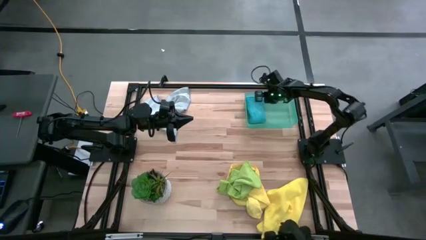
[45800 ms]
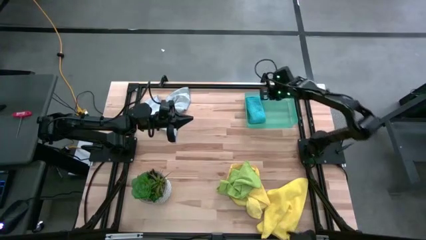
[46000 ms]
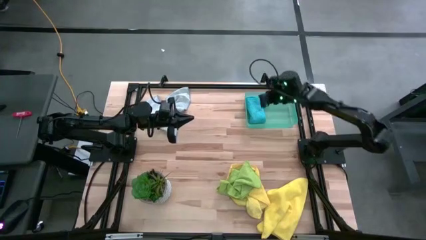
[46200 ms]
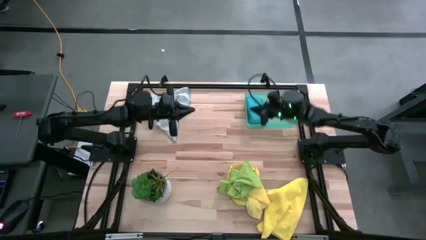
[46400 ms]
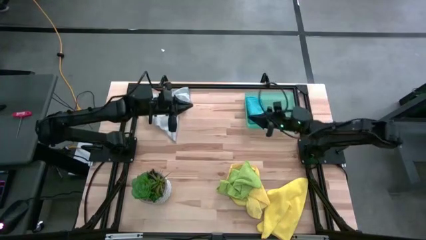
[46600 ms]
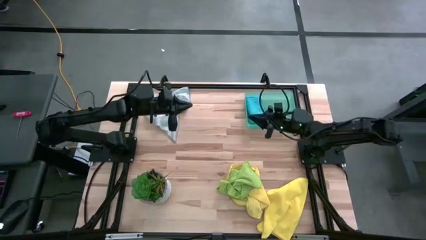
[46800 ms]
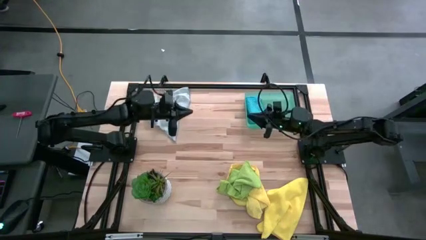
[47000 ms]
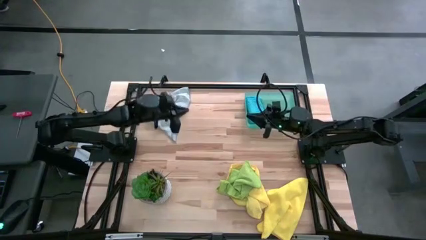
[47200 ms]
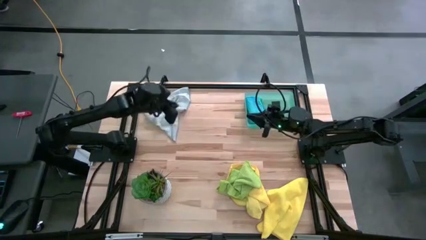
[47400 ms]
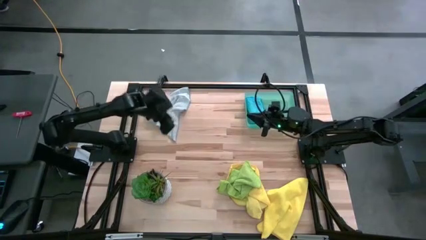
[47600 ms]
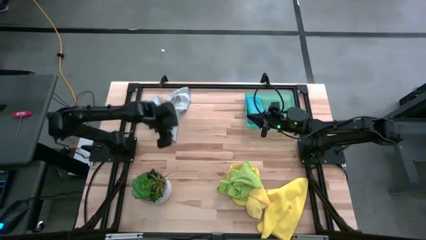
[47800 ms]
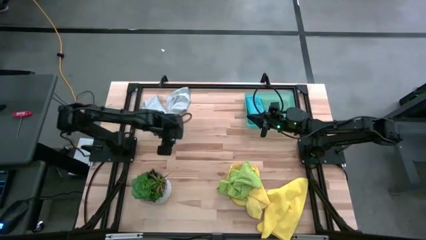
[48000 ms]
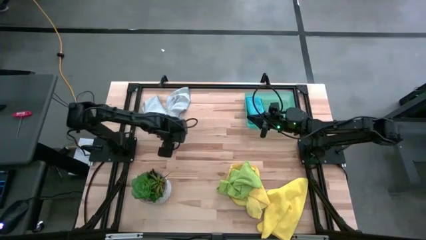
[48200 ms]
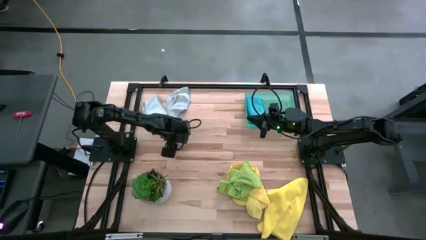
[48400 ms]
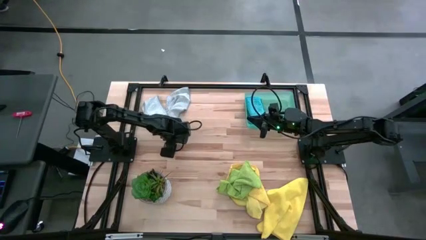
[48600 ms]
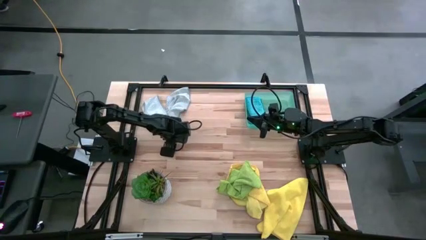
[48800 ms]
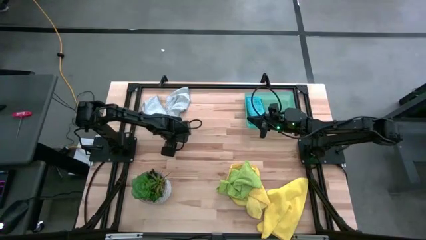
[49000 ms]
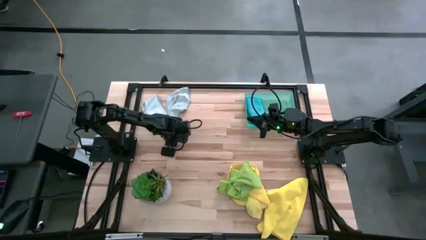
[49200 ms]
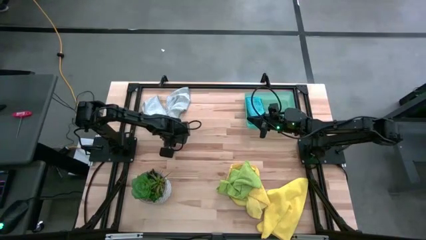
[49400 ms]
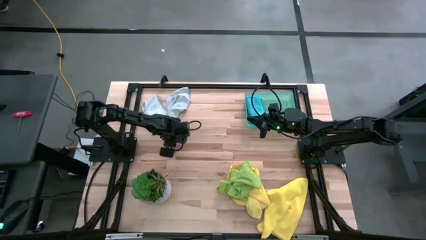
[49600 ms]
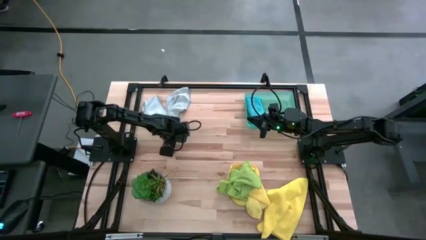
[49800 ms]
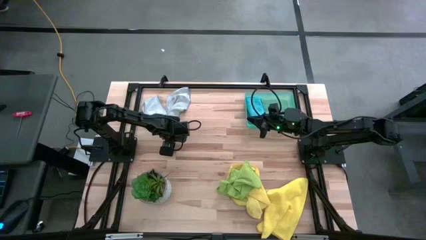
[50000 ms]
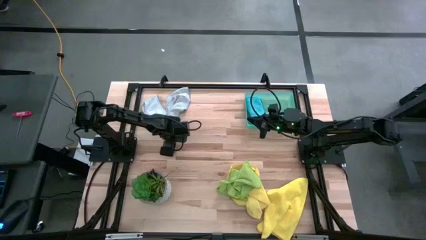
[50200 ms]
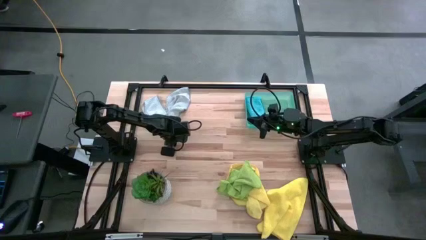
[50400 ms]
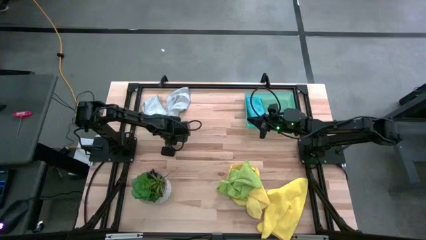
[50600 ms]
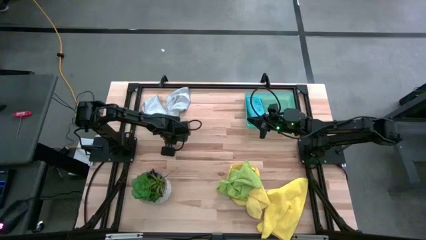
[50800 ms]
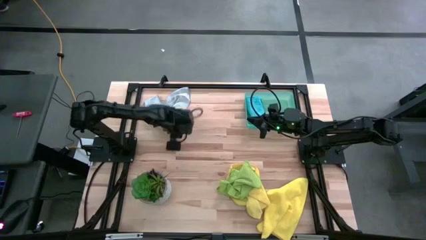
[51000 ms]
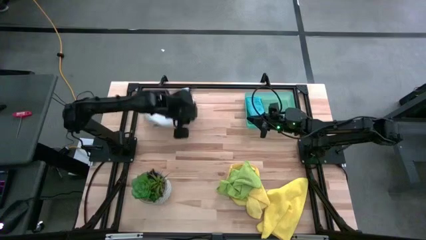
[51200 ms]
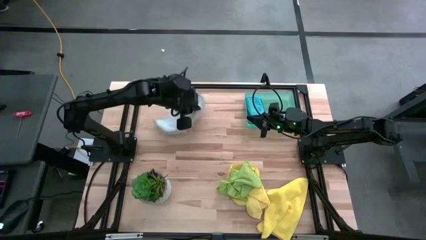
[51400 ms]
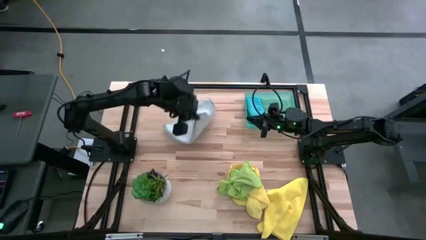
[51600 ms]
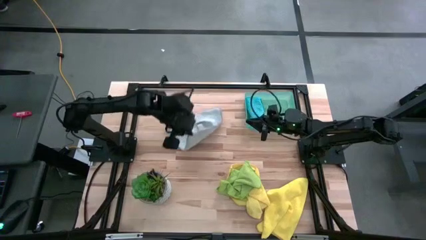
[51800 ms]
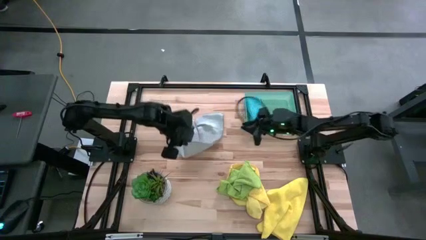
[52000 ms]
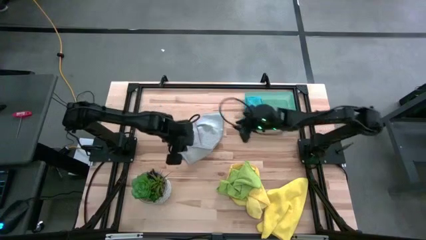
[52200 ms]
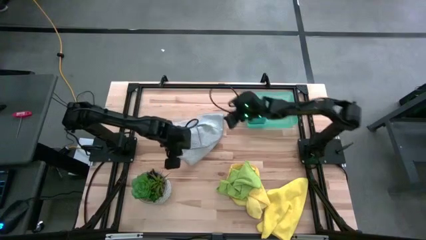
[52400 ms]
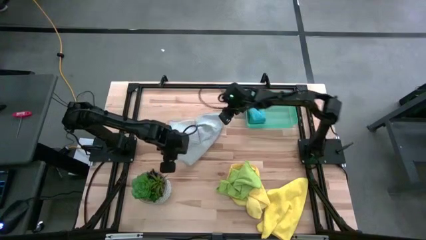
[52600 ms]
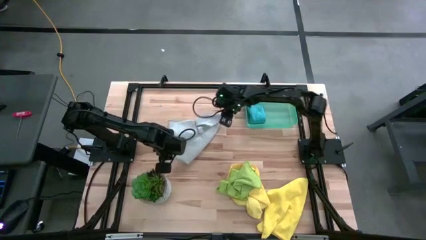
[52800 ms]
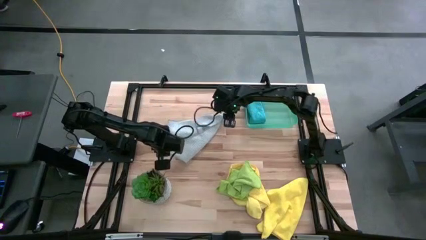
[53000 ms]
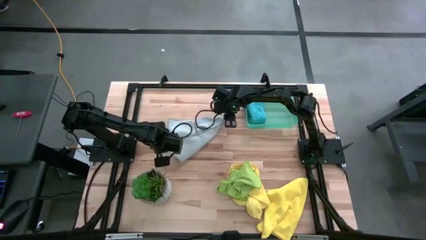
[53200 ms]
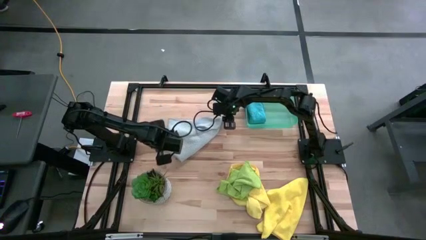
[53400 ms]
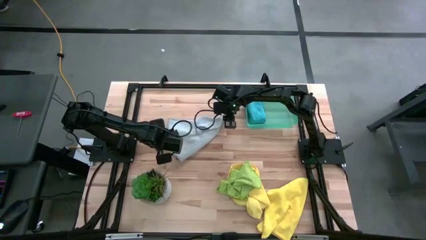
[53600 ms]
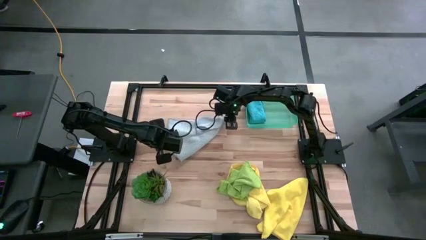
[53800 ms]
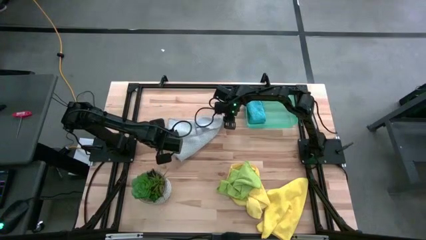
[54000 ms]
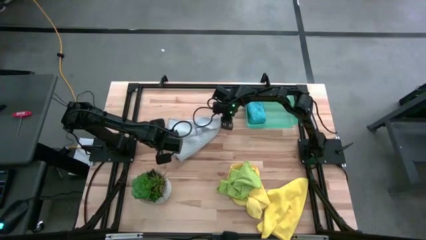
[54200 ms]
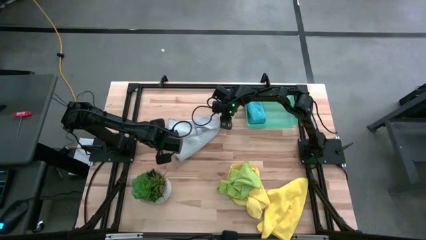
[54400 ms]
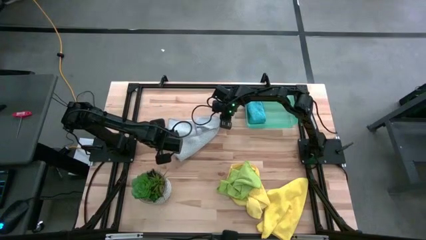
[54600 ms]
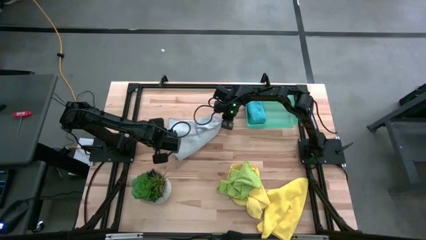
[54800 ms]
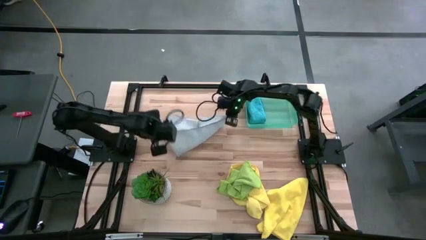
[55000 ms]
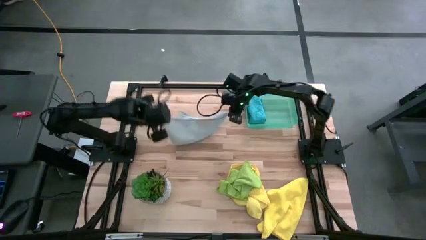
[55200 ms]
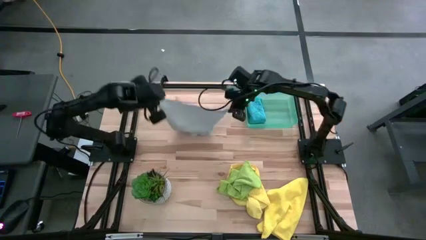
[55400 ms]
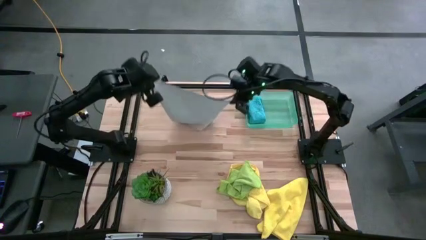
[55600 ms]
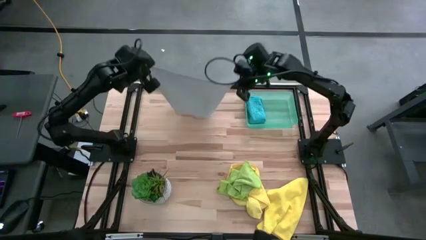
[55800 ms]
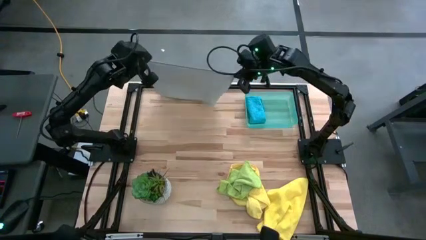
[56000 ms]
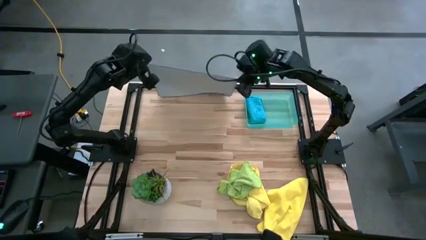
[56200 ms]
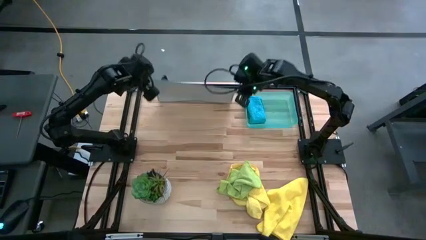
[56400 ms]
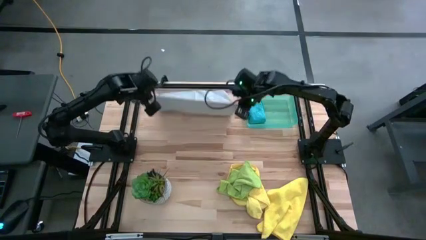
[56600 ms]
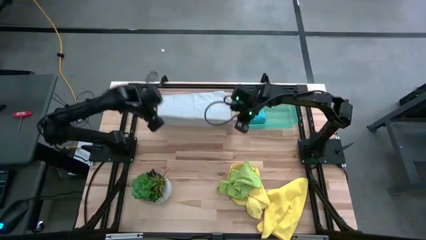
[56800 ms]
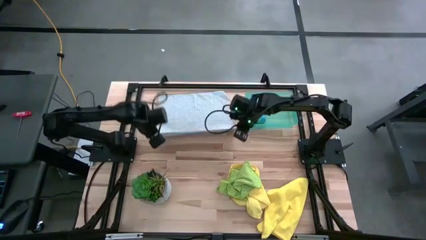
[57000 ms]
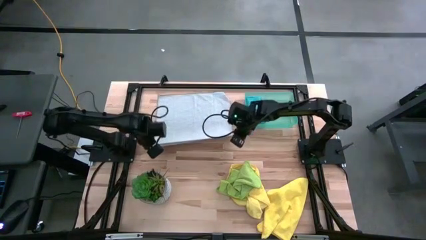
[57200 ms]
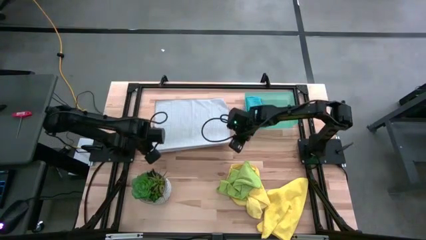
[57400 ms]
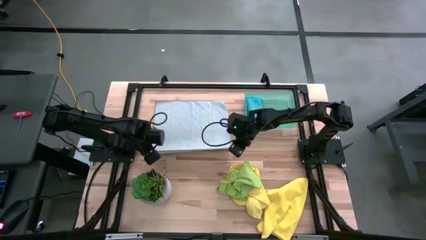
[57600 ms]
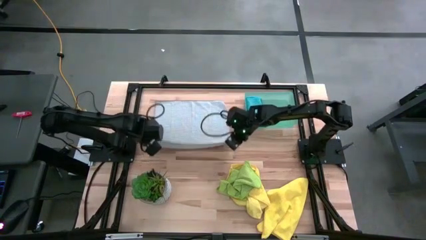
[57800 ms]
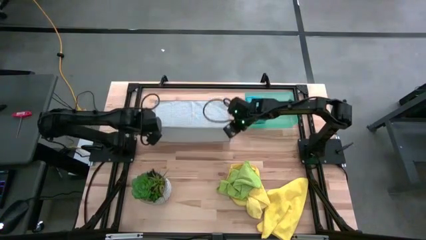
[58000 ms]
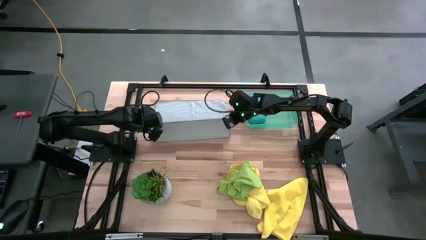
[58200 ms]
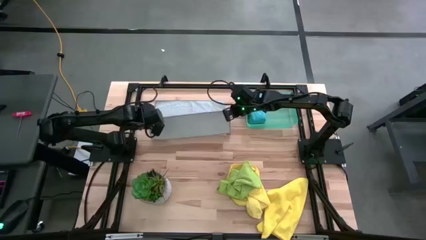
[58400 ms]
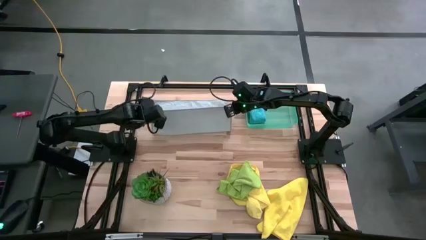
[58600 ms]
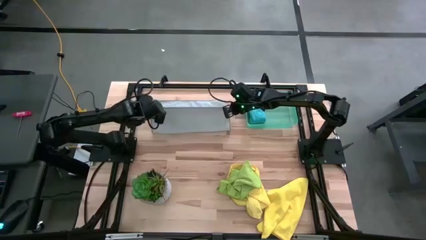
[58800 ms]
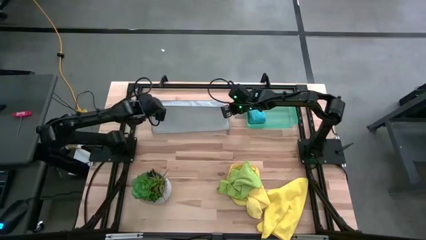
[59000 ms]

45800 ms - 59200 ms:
Task: Fold microfiber towels
Fold the gray towel

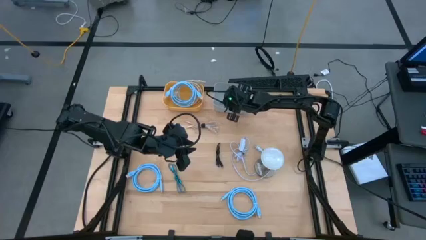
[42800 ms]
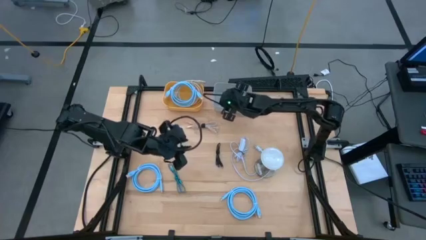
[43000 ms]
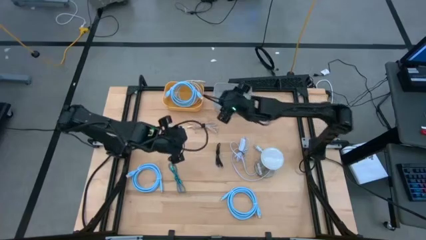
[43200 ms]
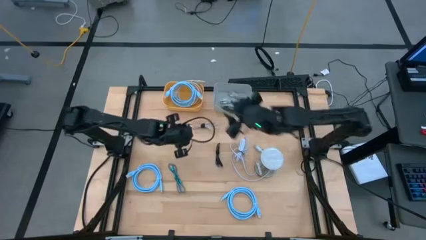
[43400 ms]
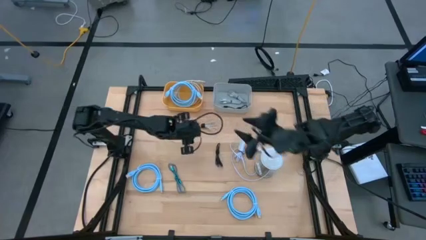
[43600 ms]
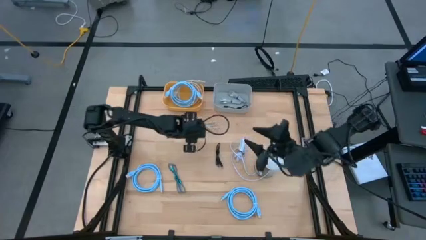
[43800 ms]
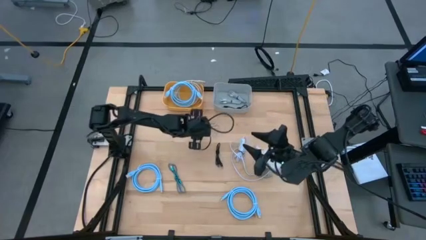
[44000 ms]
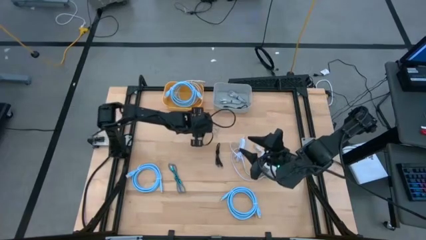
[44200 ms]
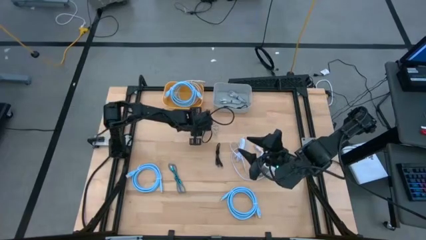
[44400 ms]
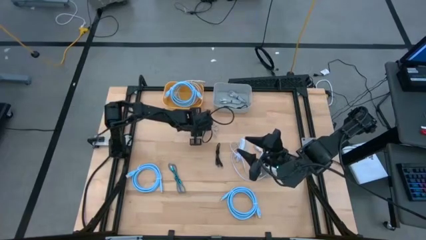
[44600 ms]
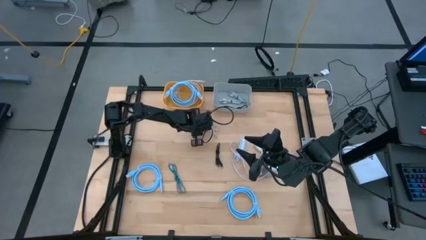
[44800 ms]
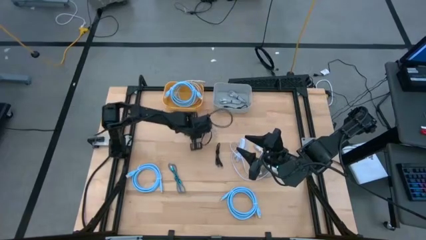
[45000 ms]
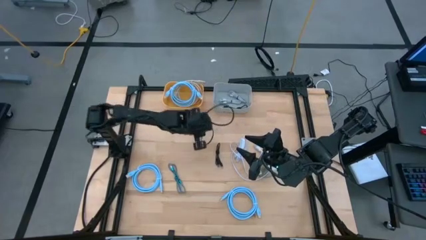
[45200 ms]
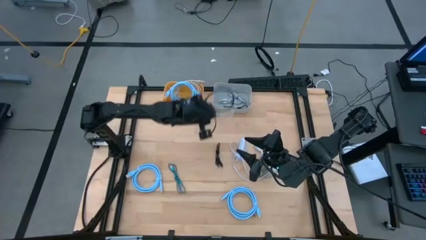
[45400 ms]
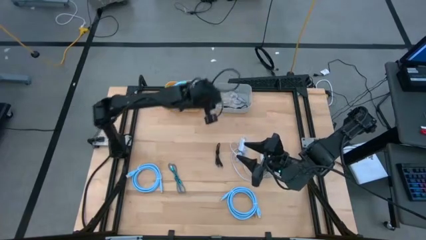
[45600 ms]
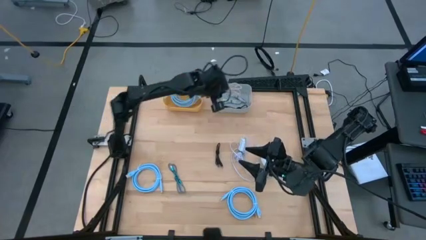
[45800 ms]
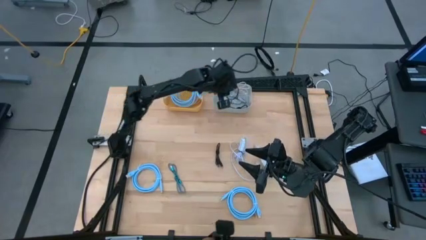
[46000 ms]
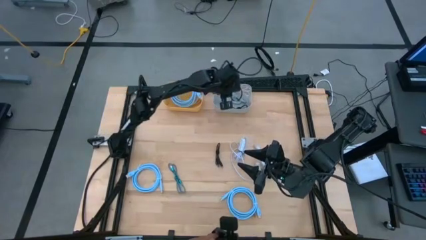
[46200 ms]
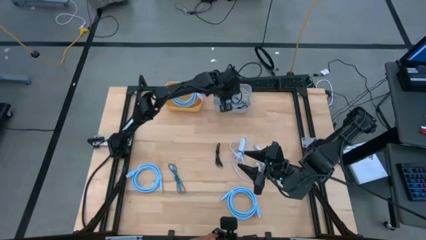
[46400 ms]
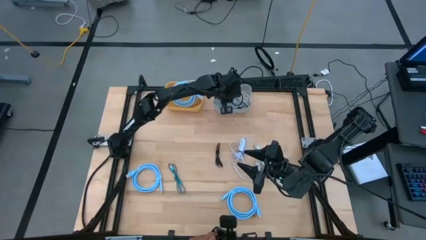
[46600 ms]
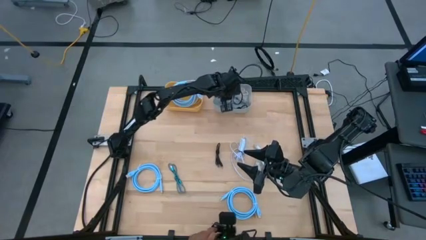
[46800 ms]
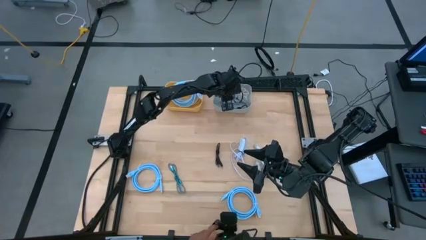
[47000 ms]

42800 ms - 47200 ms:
Task: Pick & Place USB Port
Put the orange and gray charger cable into the gray bin
